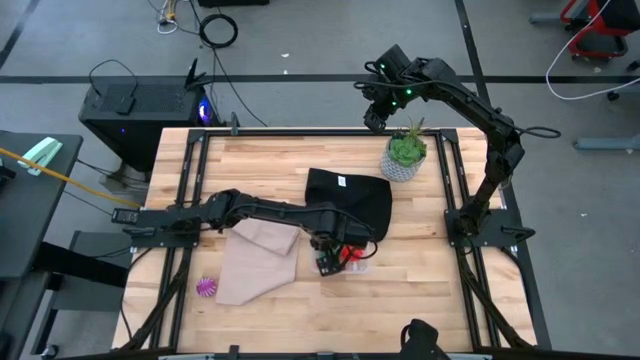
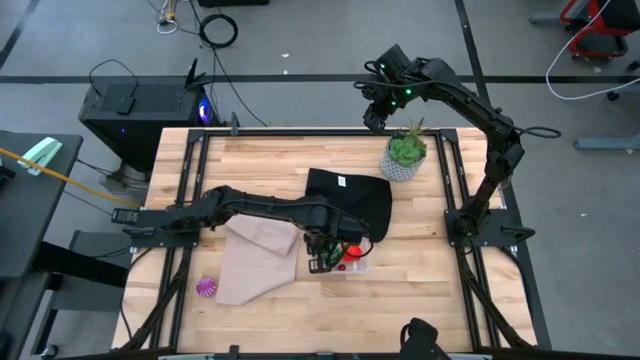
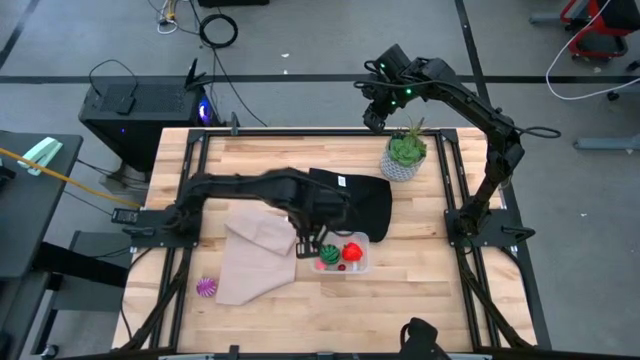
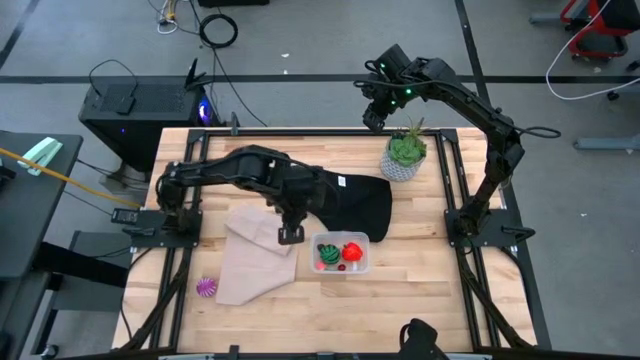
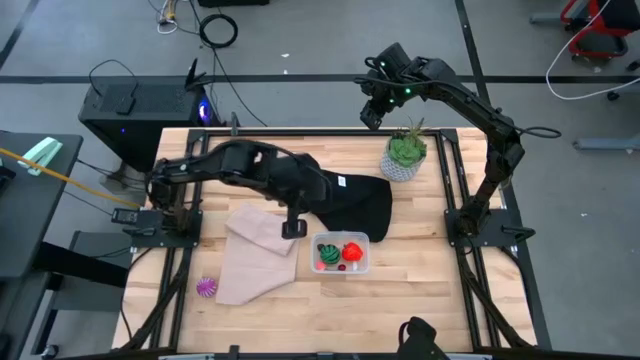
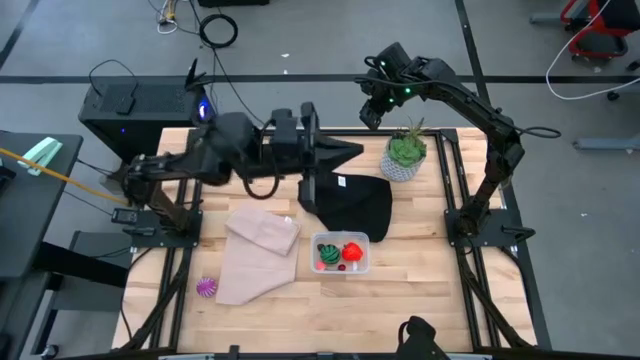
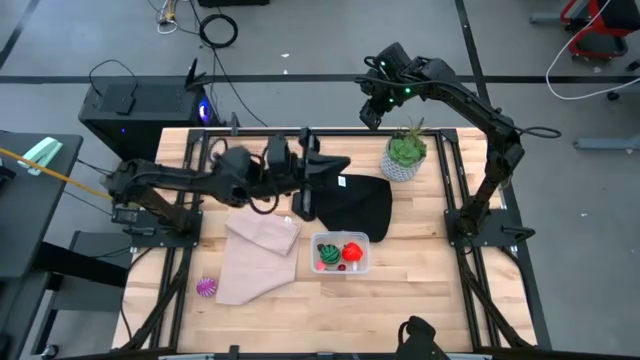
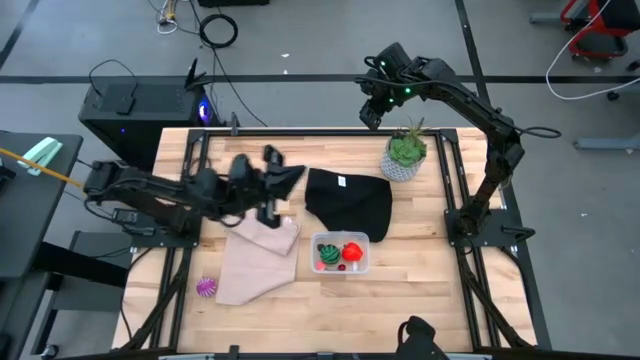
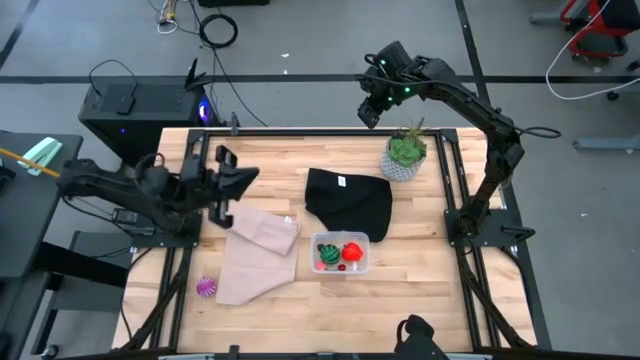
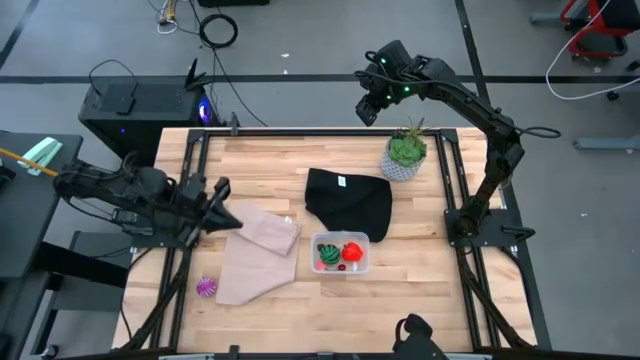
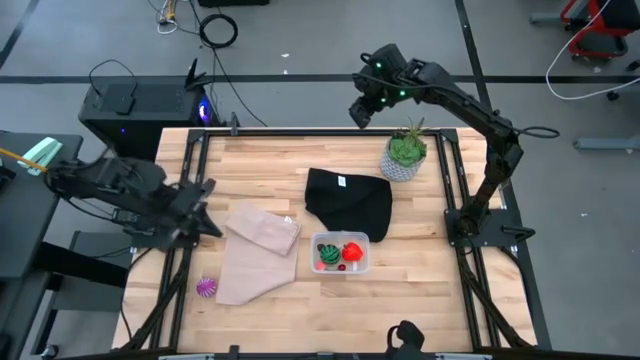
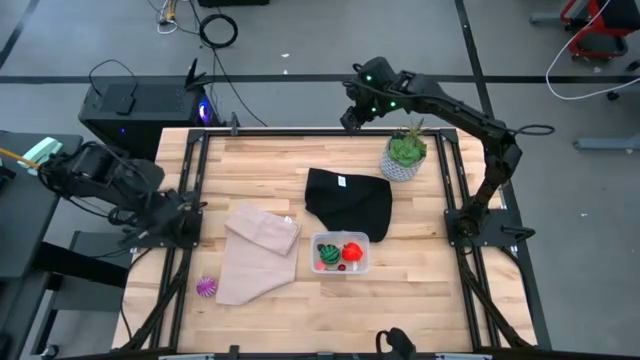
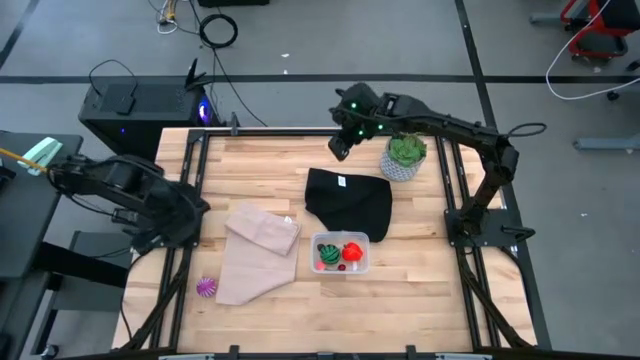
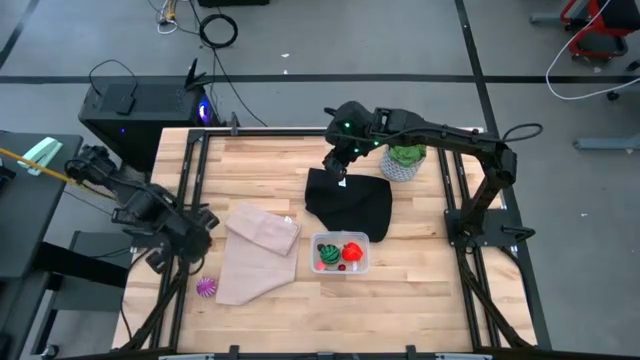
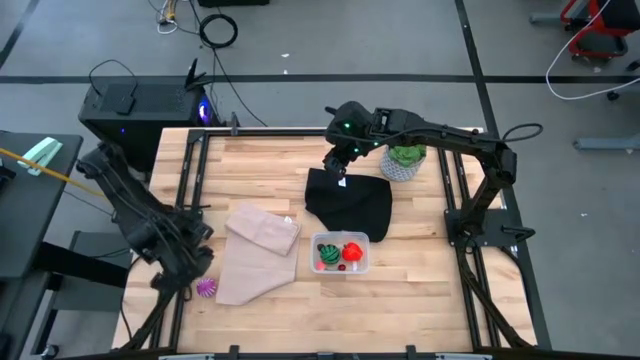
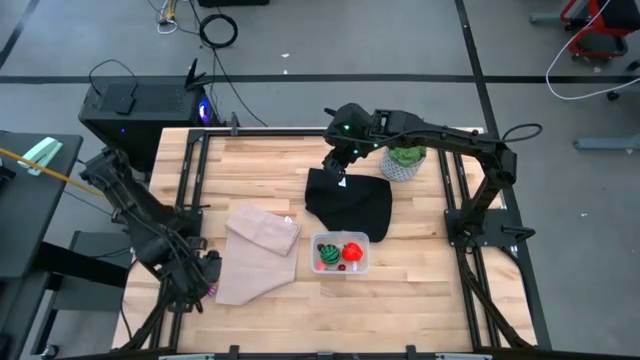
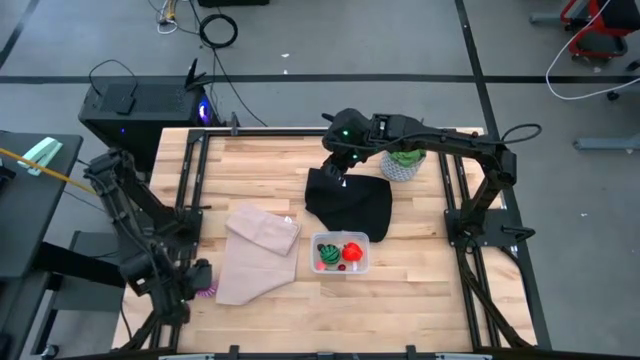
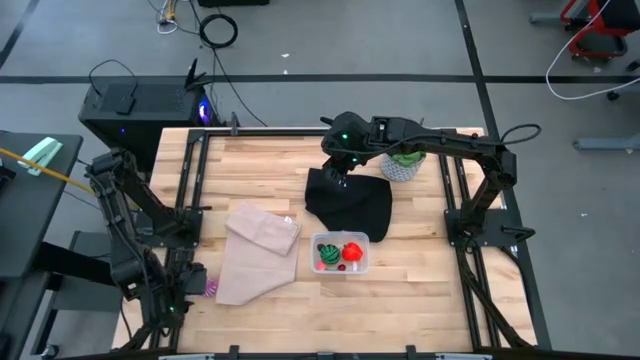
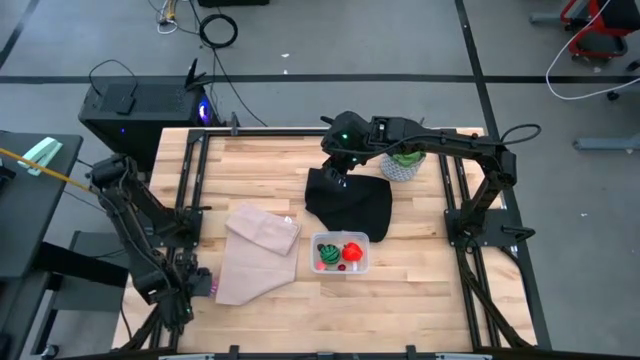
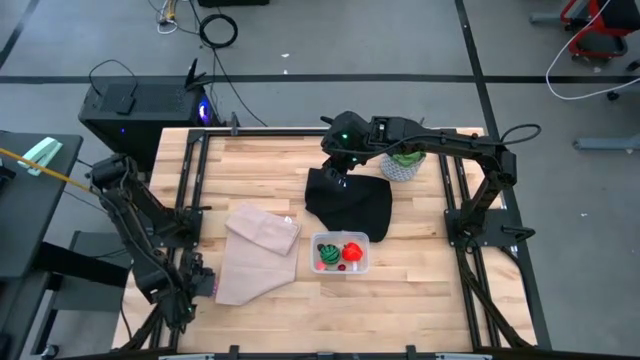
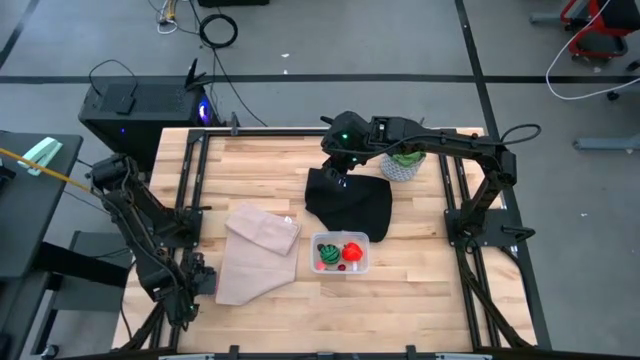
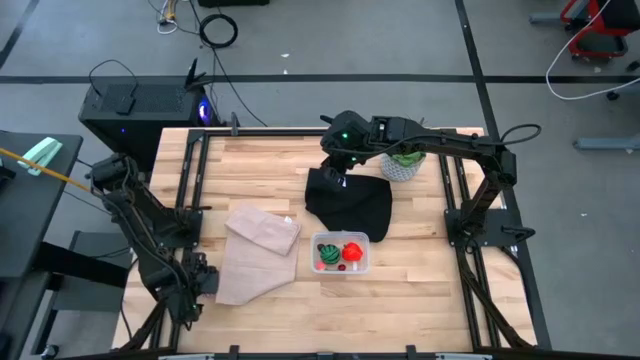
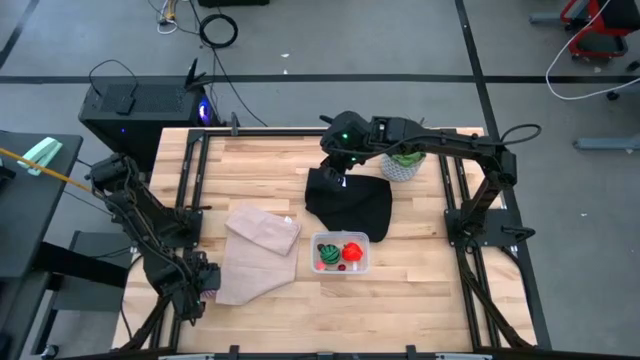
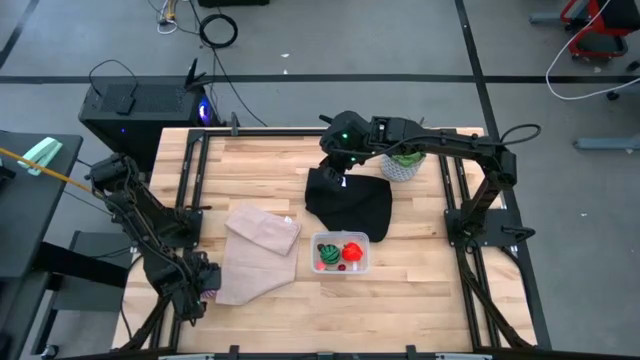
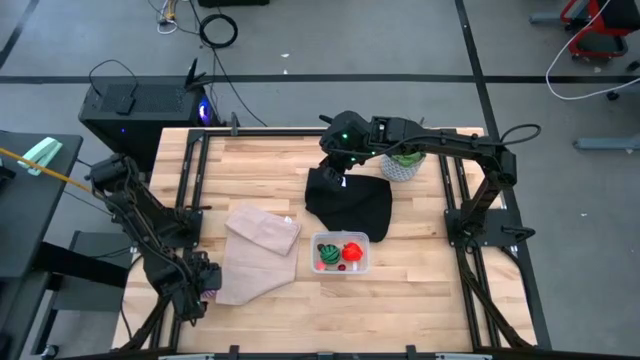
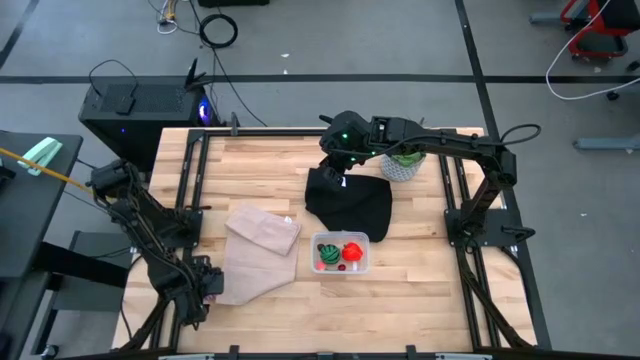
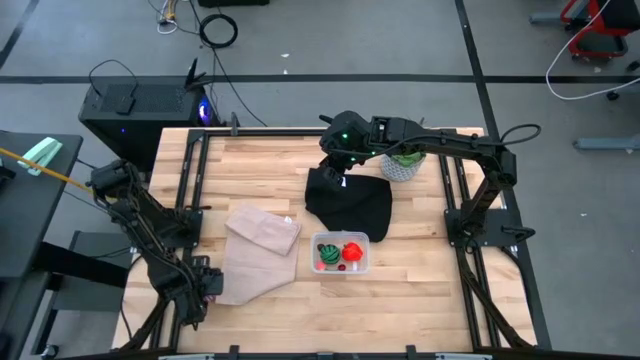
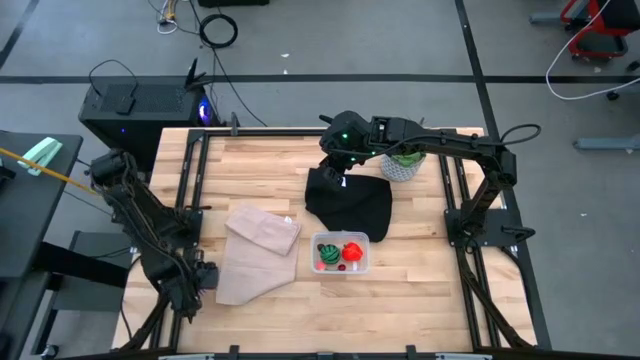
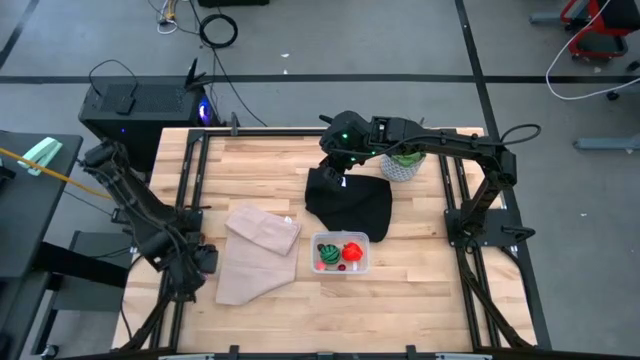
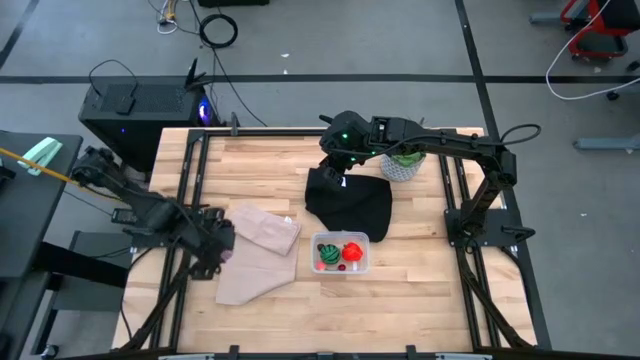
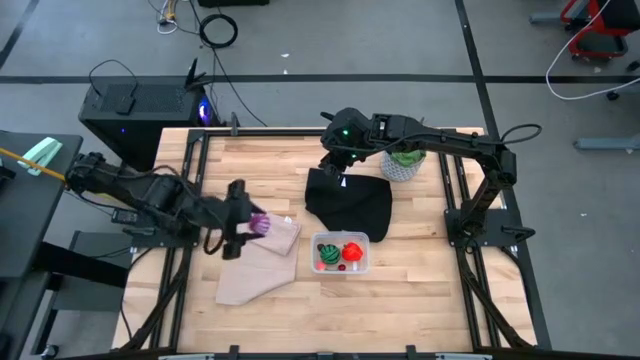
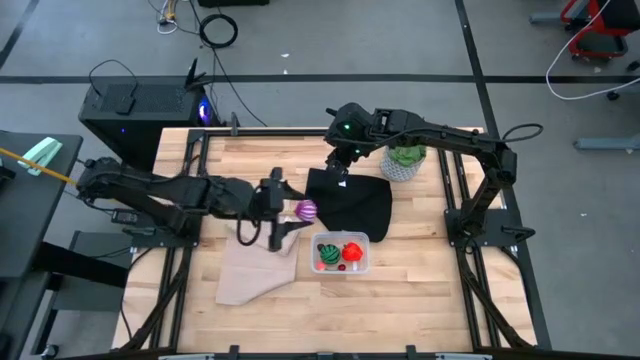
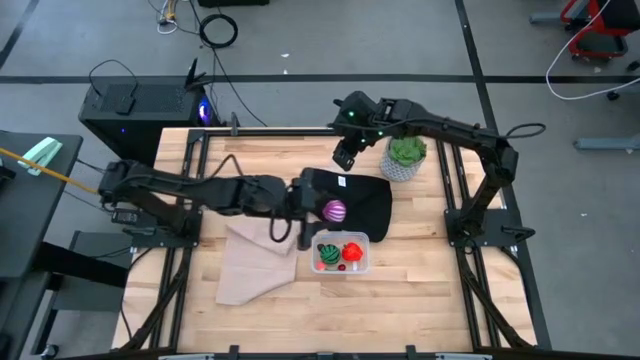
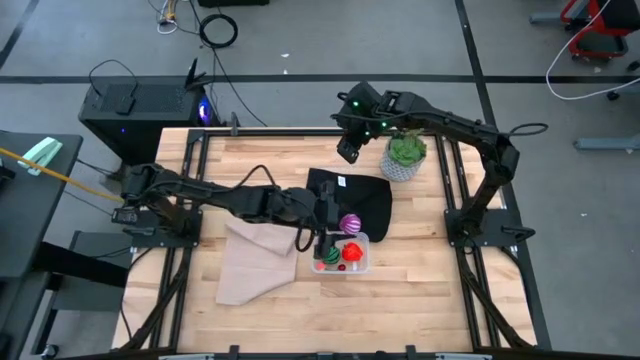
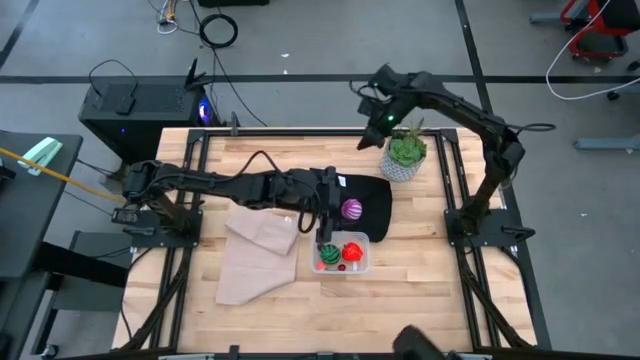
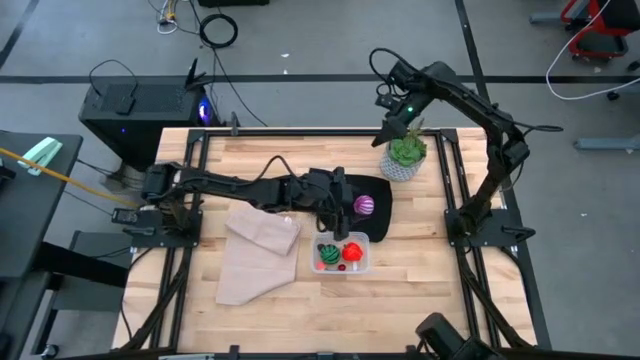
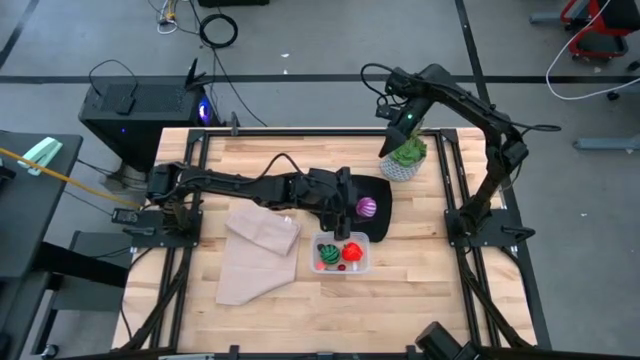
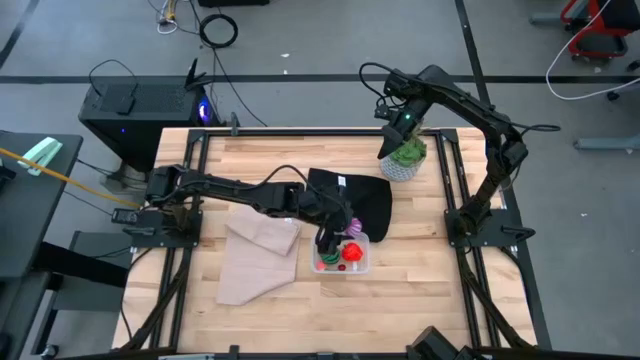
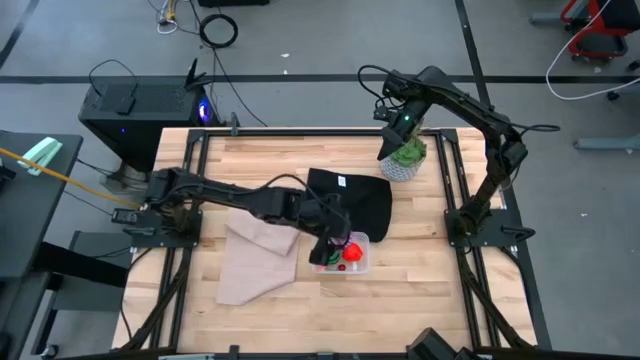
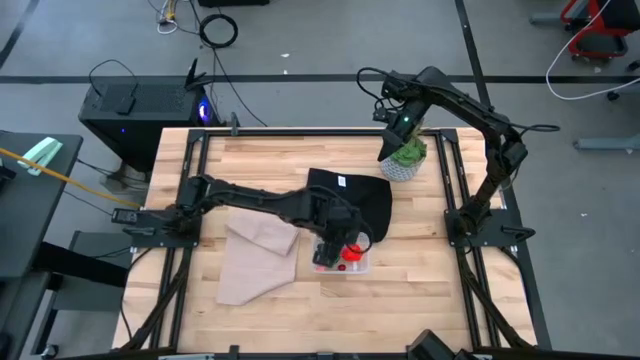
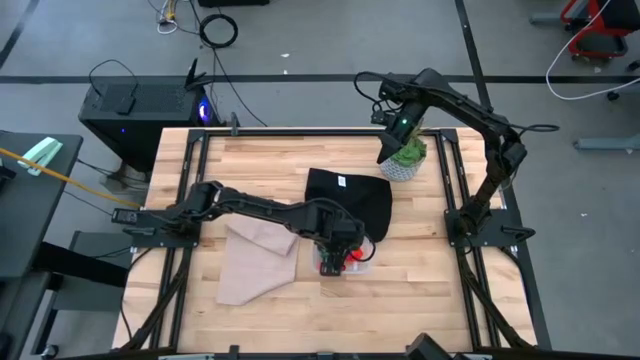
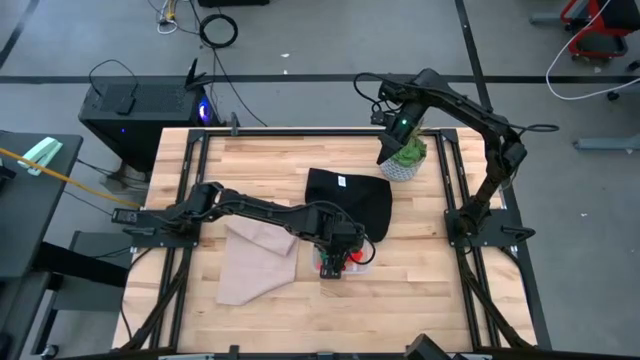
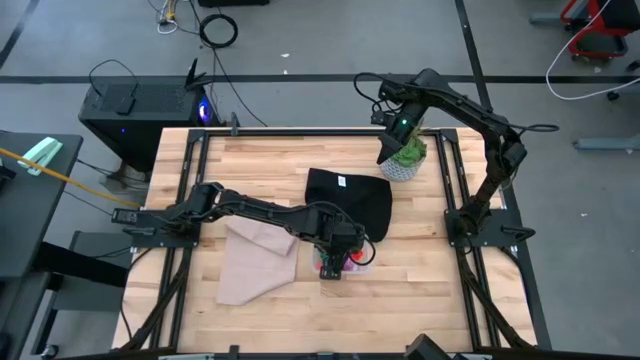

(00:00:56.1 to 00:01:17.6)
Task: Pick and placing Produce into tupperware
Put the onion into the transparent bin

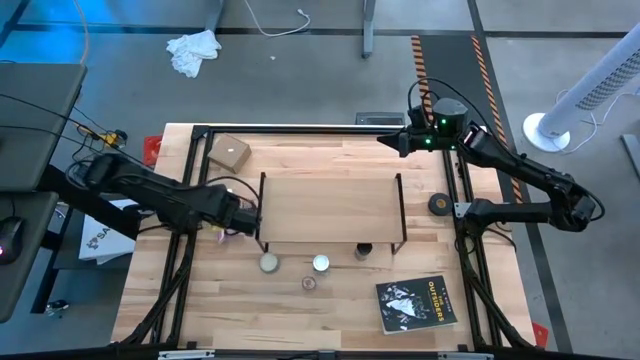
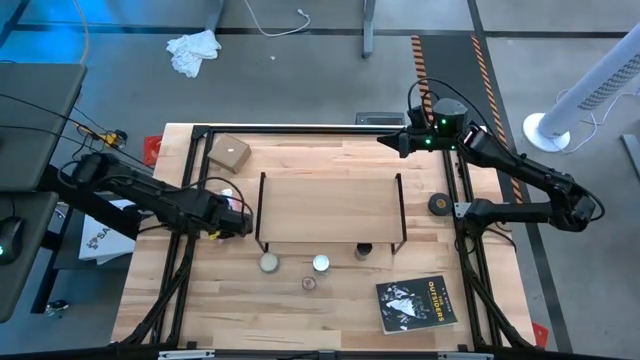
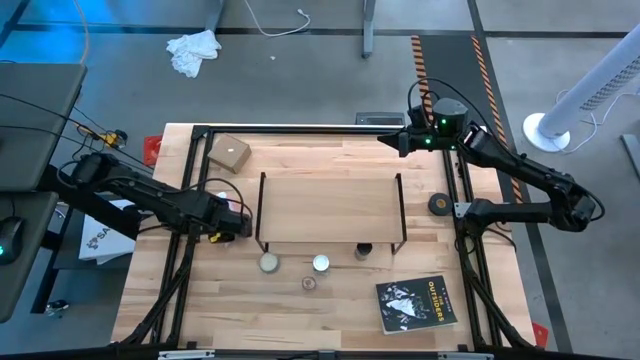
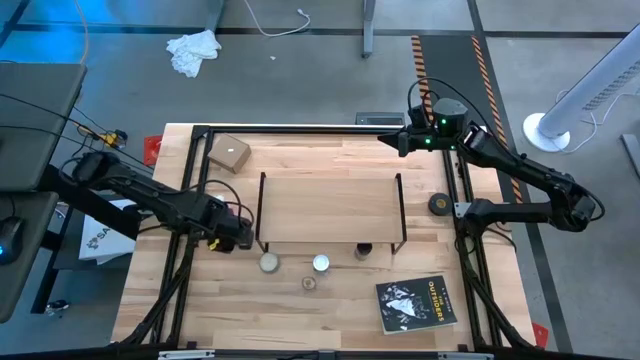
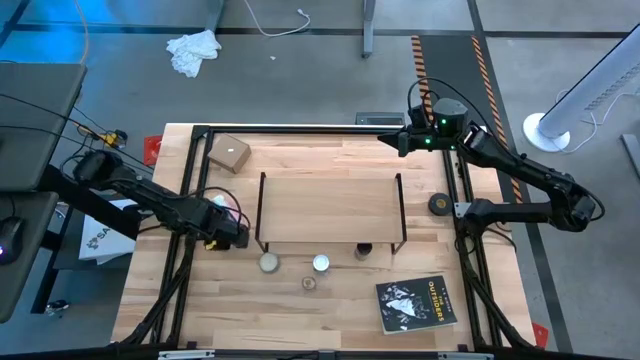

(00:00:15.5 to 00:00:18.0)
Task: Shelf spices
Adjust the stapler on the table
